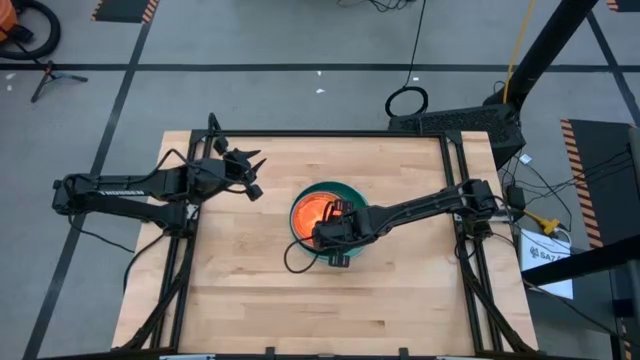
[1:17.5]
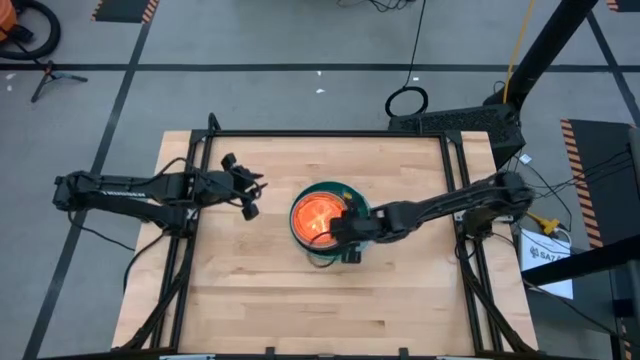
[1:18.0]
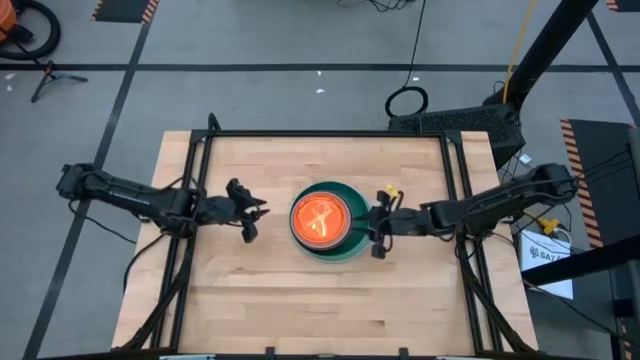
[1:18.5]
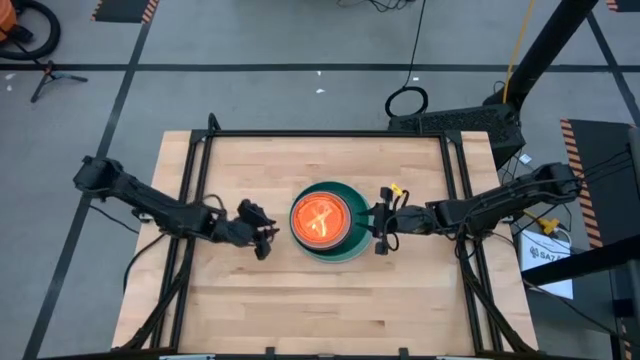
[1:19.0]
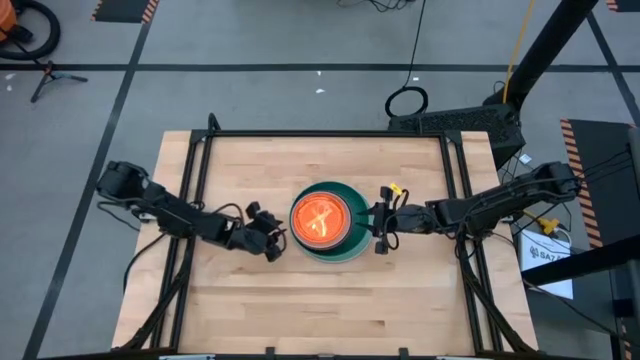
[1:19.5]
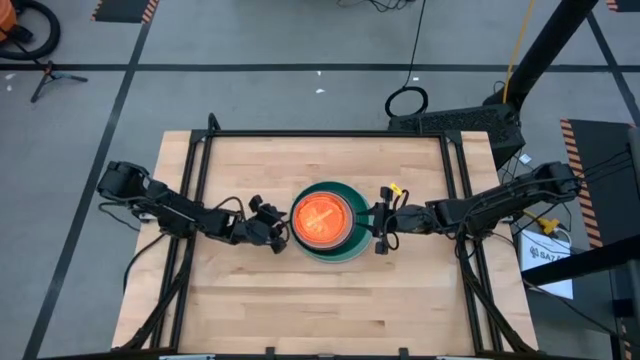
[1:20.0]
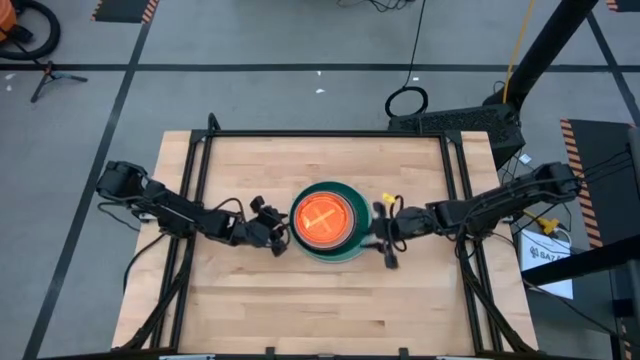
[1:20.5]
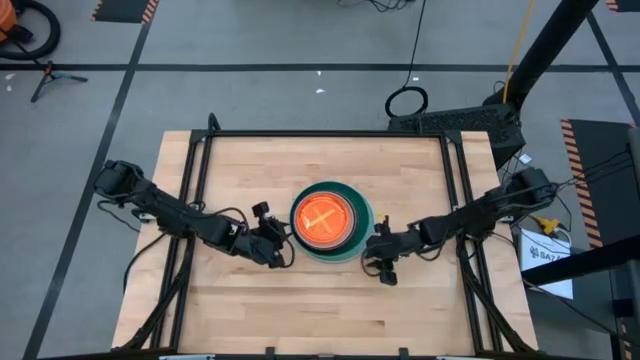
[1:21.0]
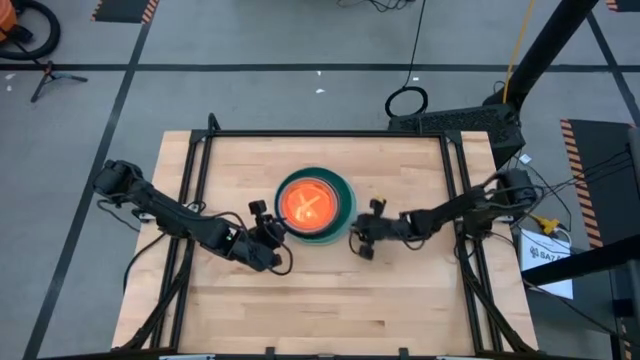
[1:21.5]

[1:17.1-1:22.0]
Task: Stack plastic plates
Adjust the stacked plates

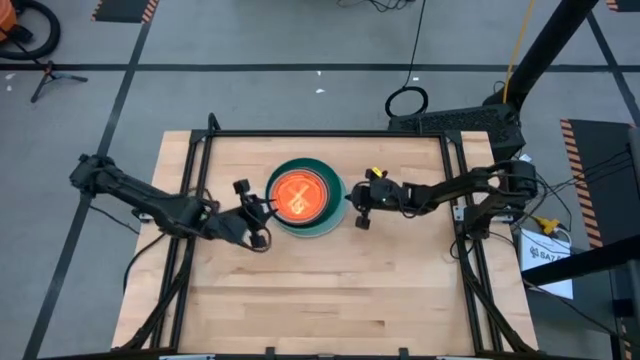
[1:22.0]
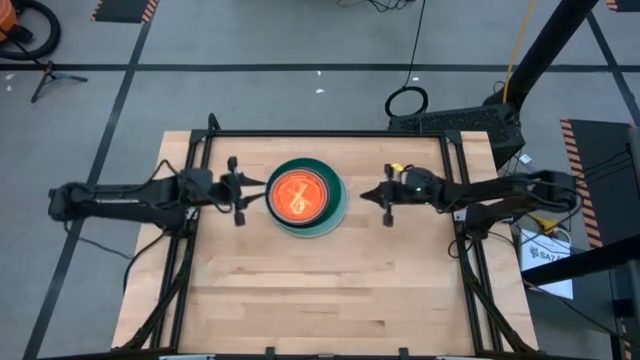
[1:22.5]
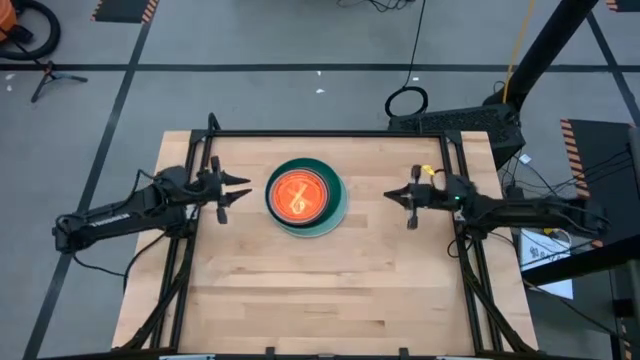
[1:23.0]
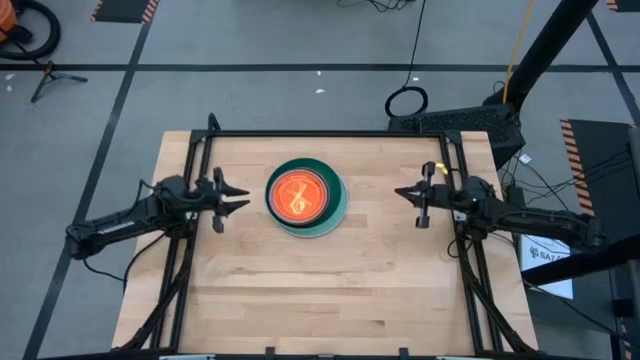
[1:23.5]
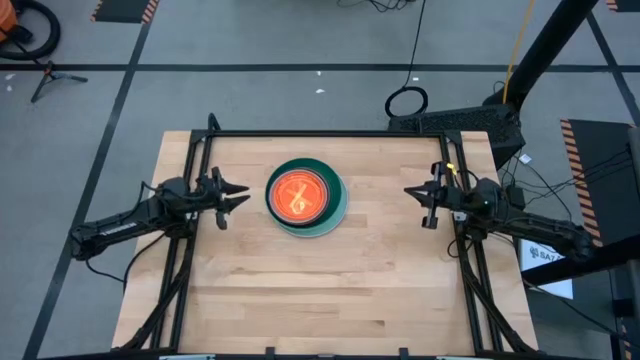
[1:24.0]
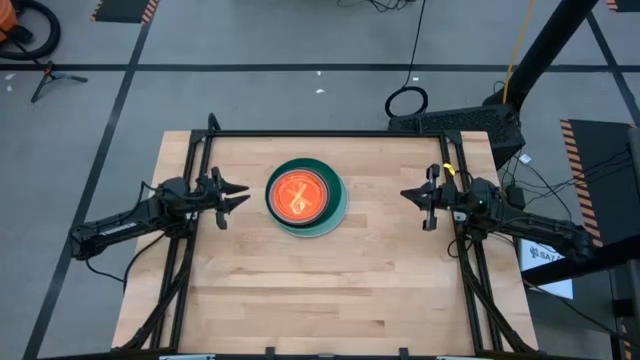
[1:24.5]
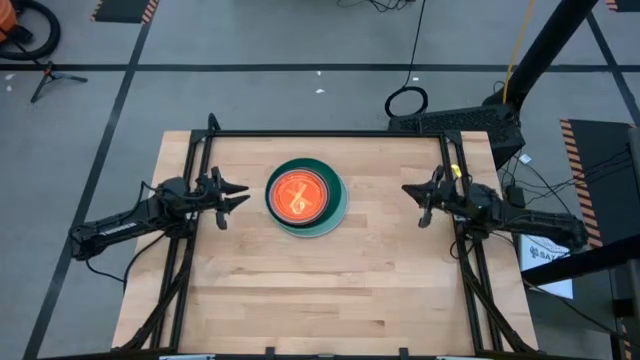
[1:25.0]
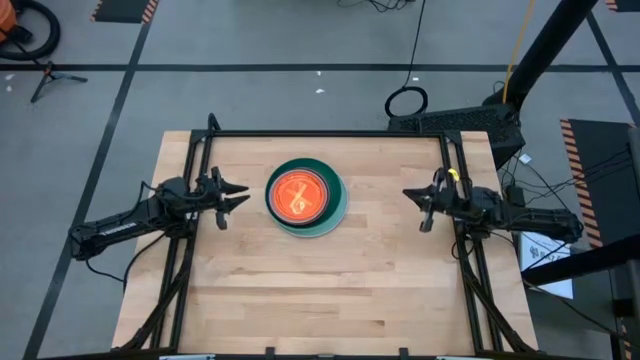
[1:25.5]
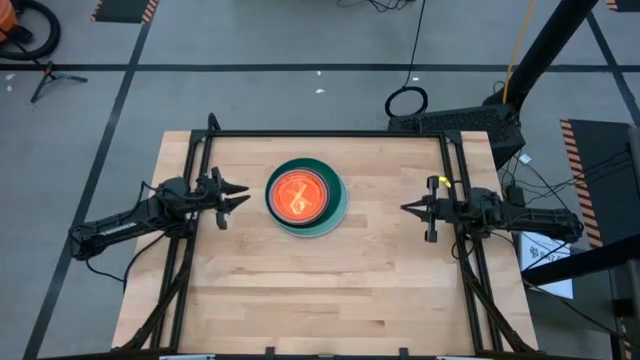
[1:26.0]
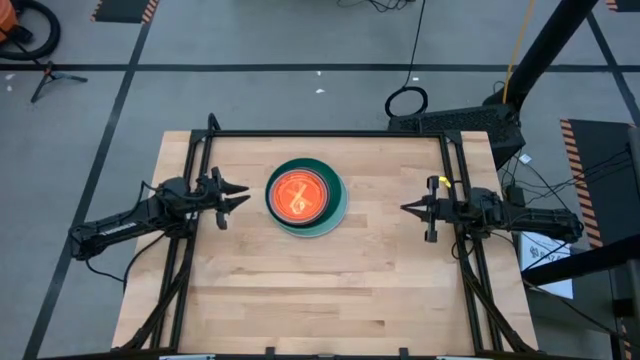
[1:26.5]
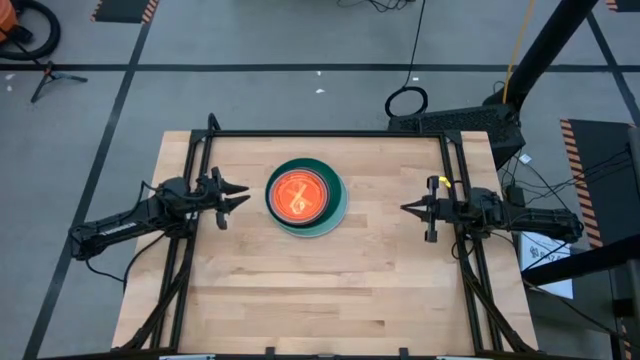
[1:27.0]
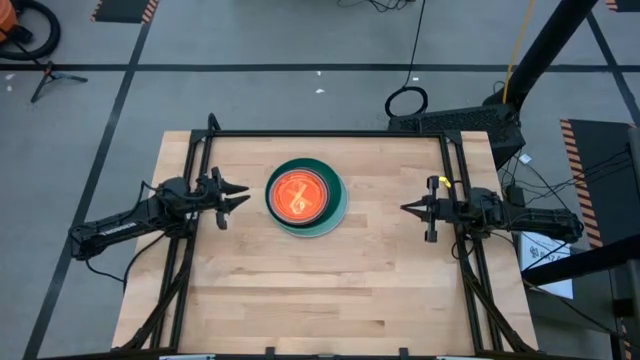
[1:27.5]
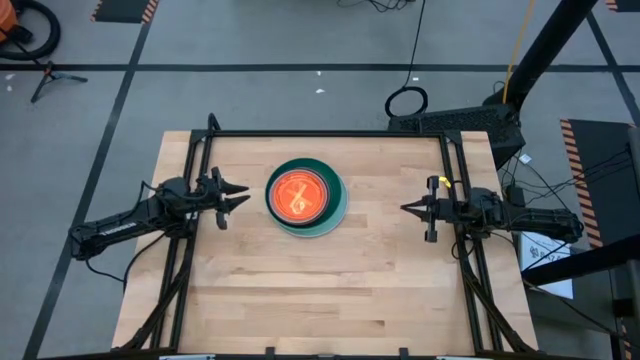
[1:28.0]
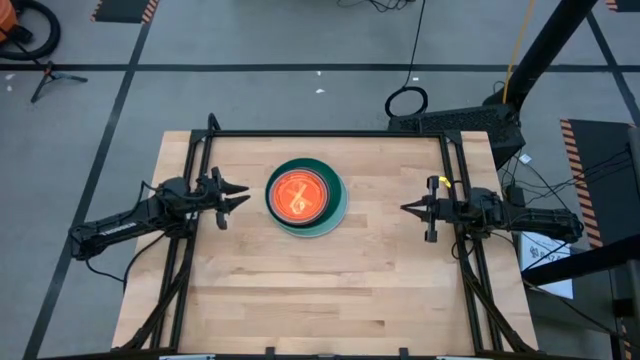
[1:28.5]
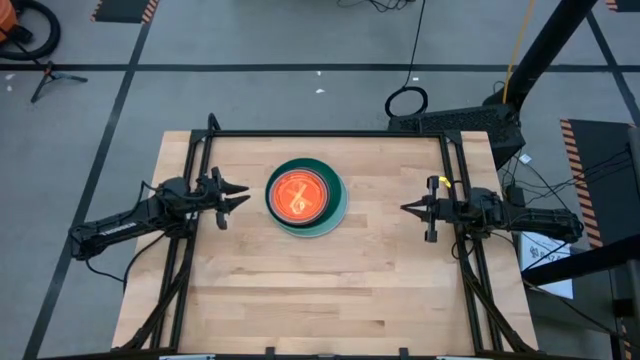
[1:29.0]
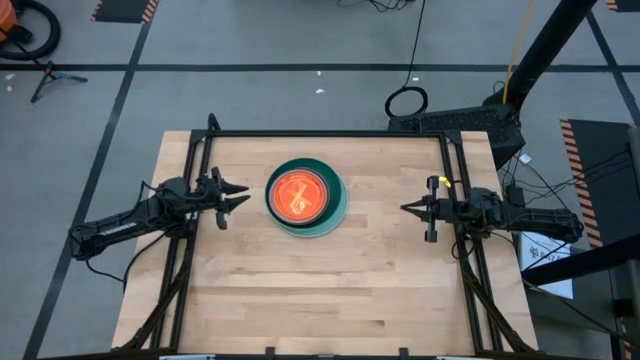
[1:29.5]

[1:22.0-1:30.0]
Return to Home Position

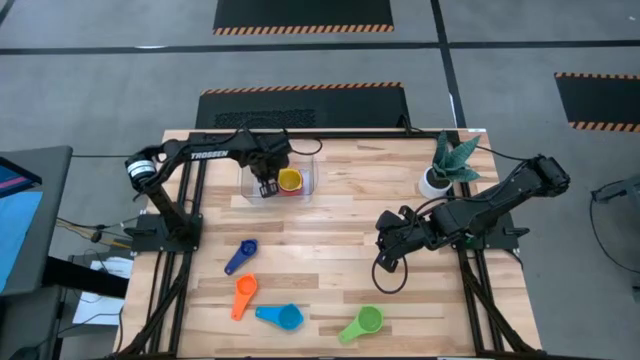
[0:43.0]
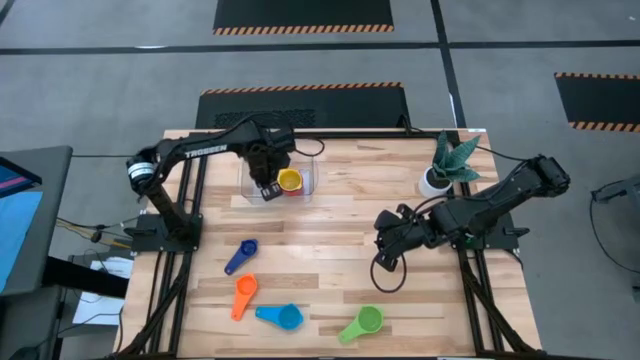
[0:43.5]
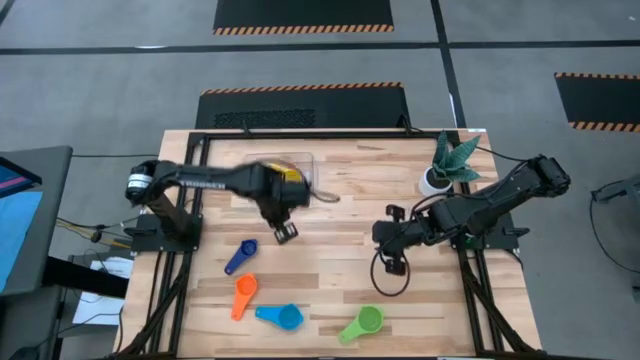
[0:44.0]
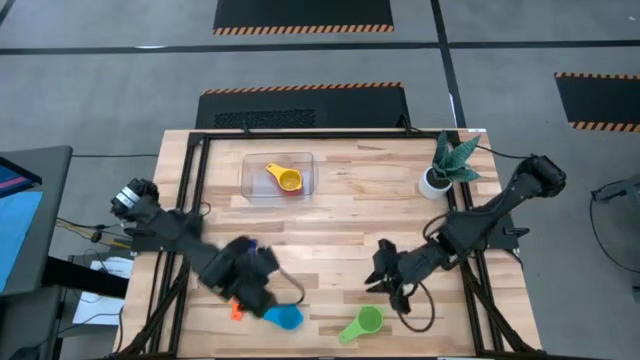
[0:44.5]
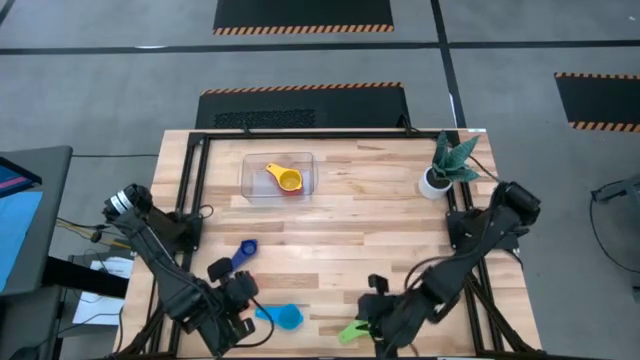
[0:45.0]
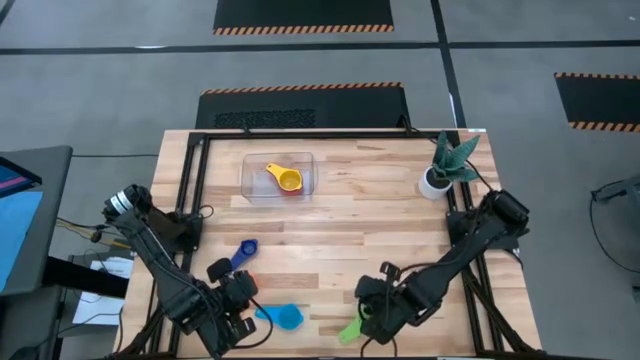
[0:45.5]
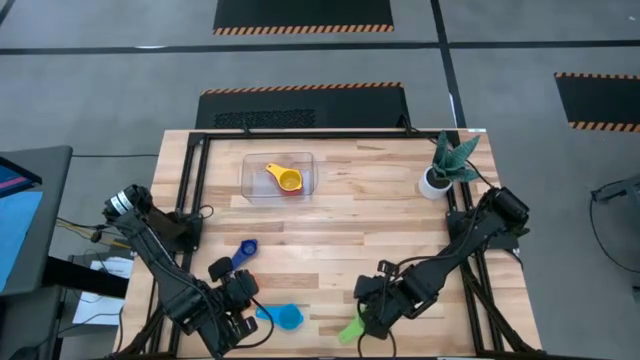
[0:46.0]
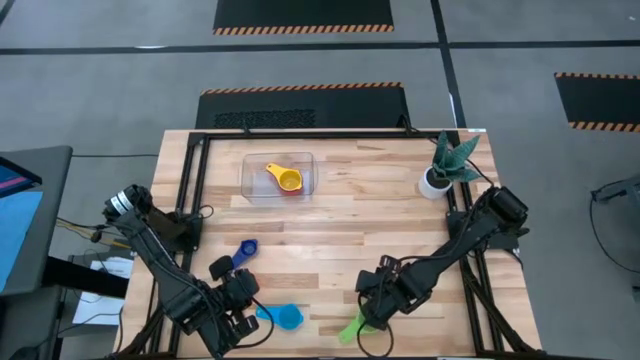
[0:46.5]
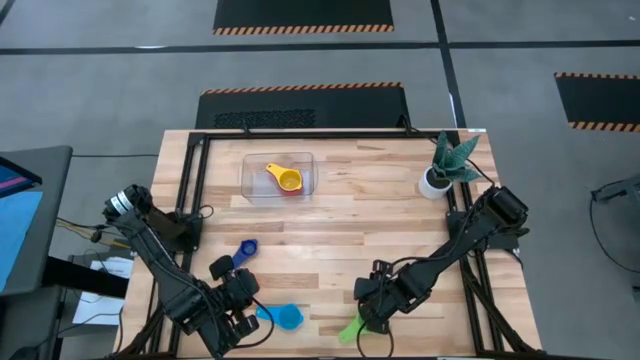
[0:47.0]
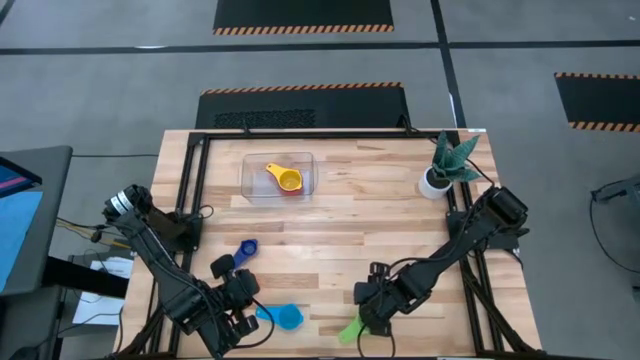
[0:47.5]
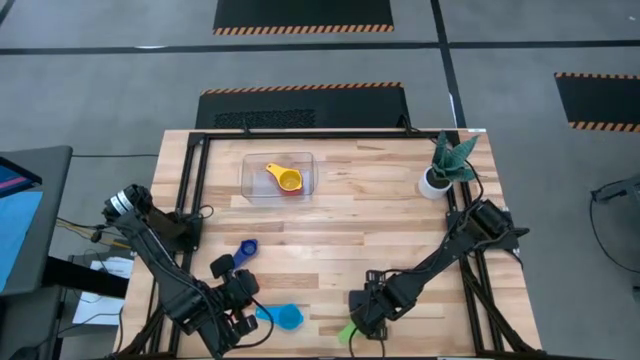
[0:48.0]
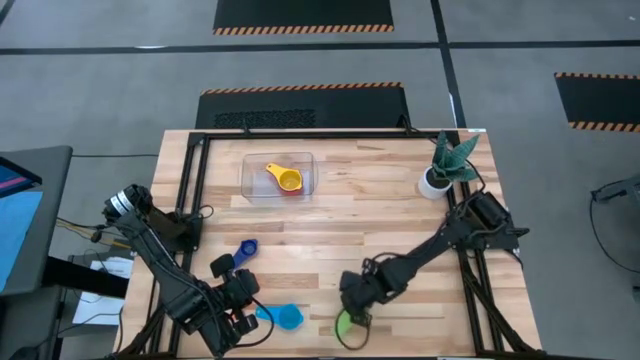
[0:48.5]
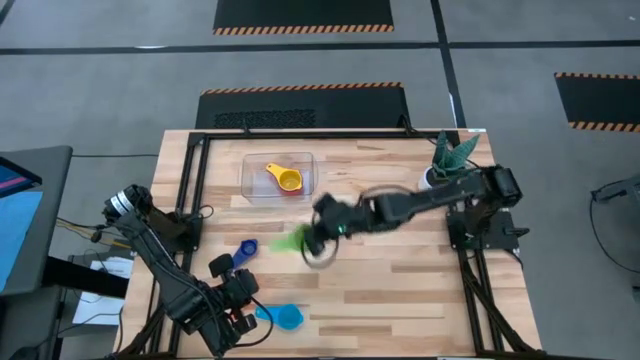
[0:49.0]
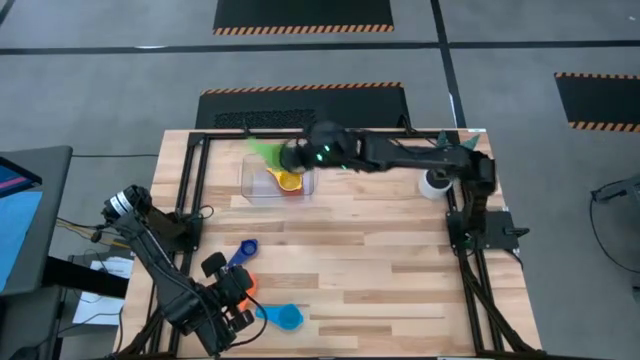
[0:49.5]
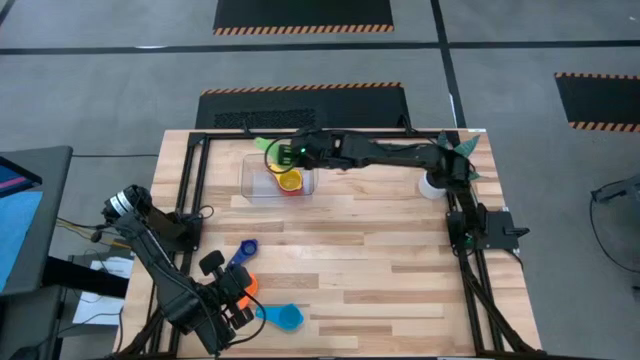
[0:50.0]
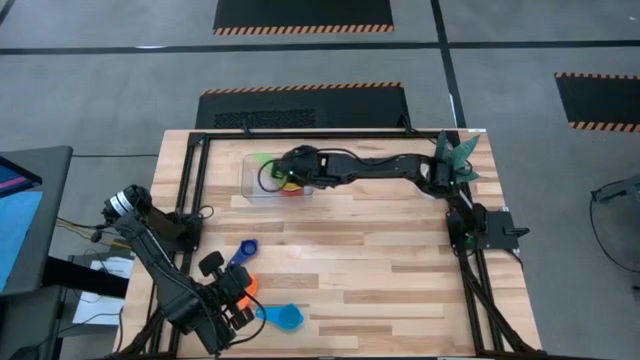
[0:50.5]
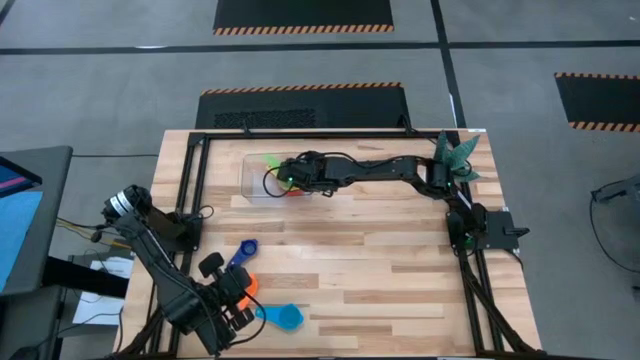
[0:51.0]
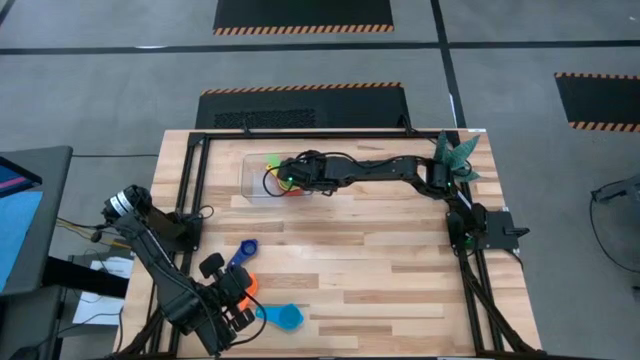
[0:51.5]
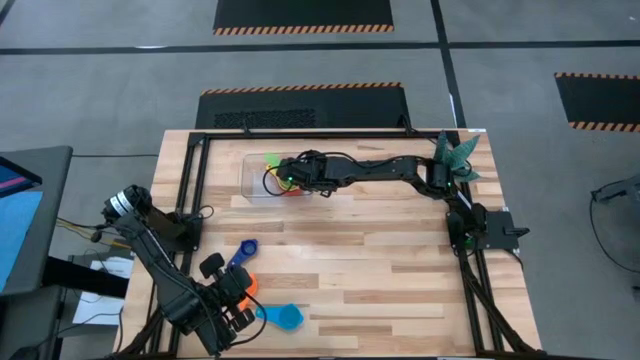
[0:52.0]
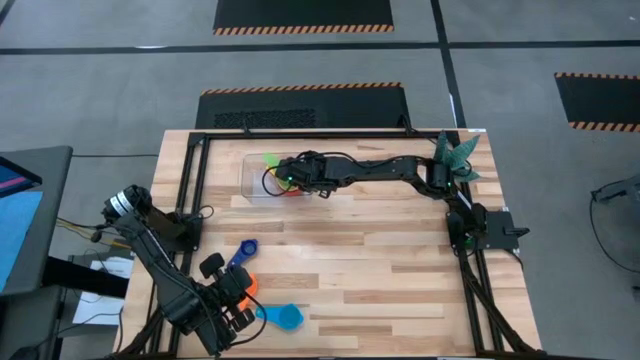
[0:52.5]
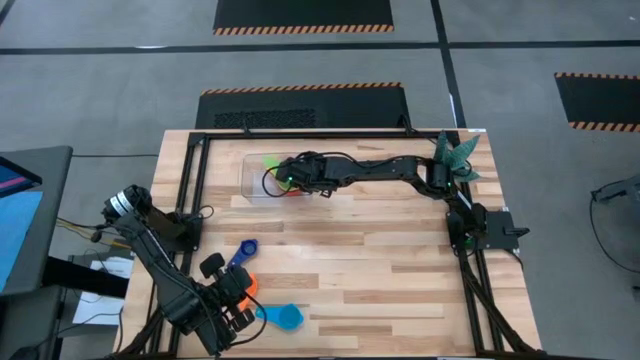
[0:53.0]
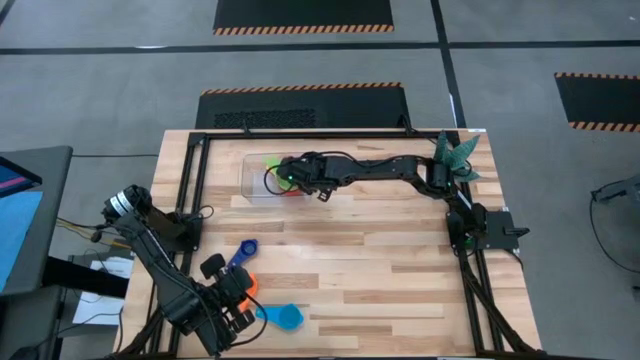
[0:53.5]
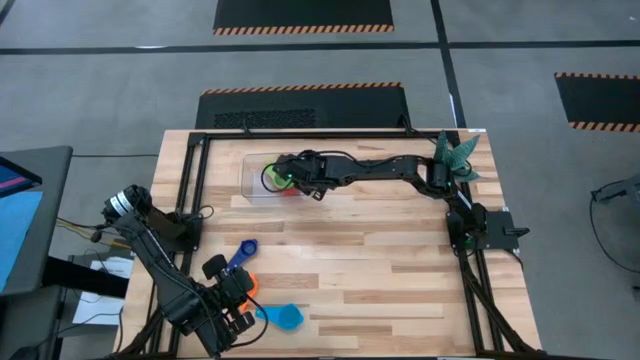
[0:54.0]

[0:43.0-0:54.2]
Task: Nest measuring cups in basket
Stack the green measuring cup into the yellow measuring cup in the transparent bin
